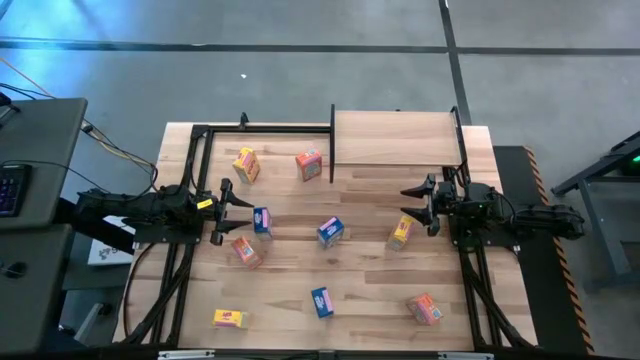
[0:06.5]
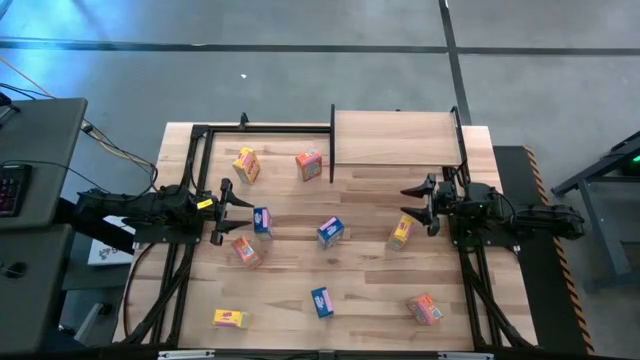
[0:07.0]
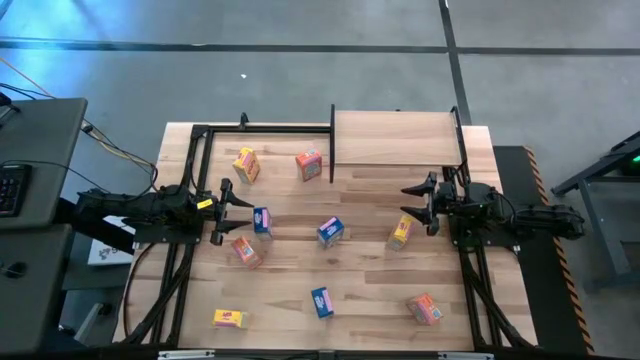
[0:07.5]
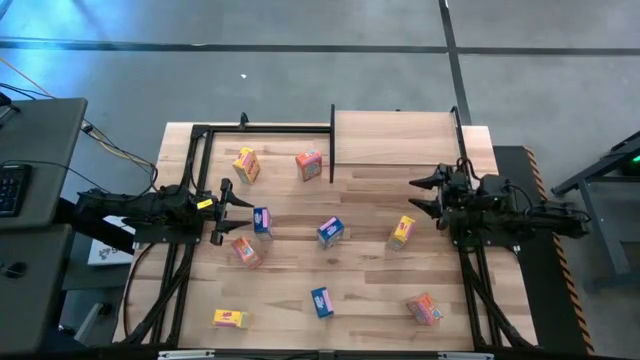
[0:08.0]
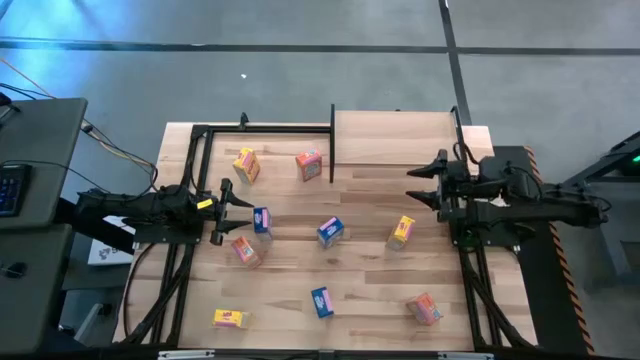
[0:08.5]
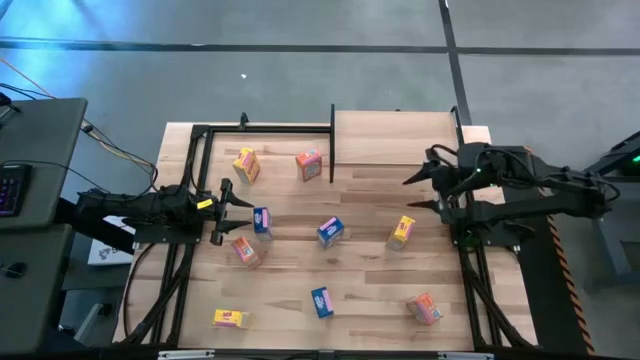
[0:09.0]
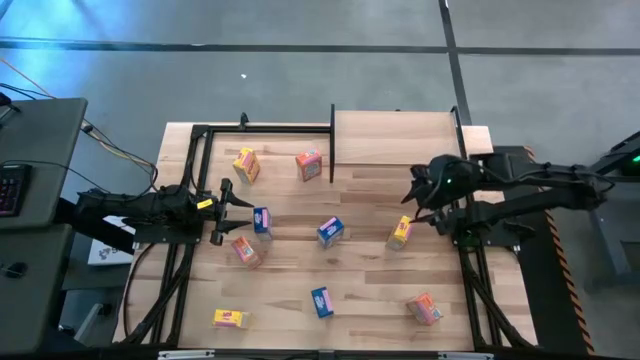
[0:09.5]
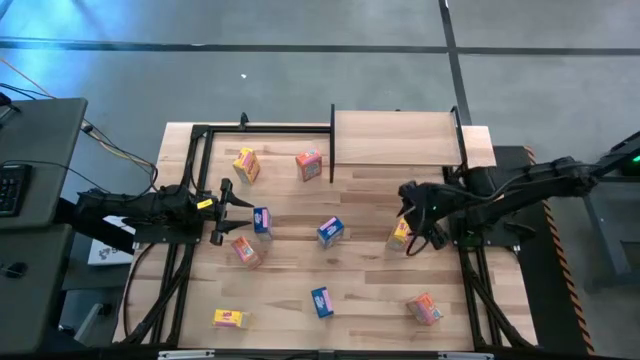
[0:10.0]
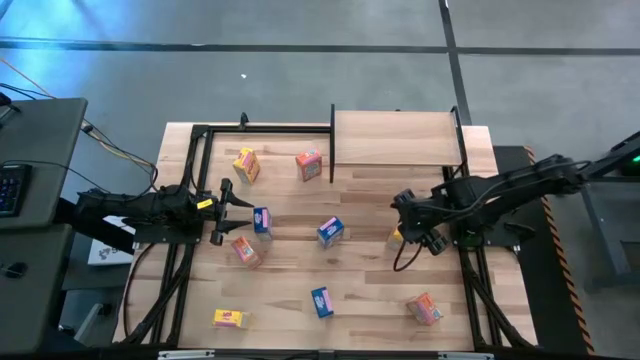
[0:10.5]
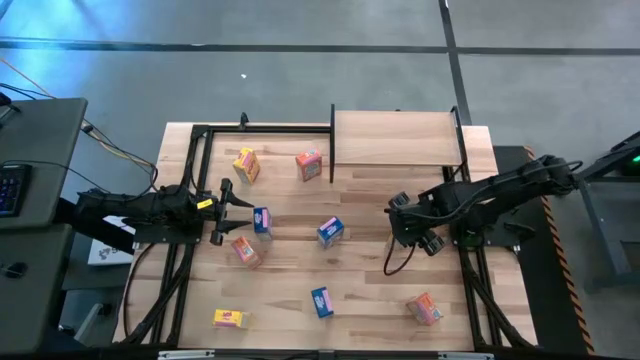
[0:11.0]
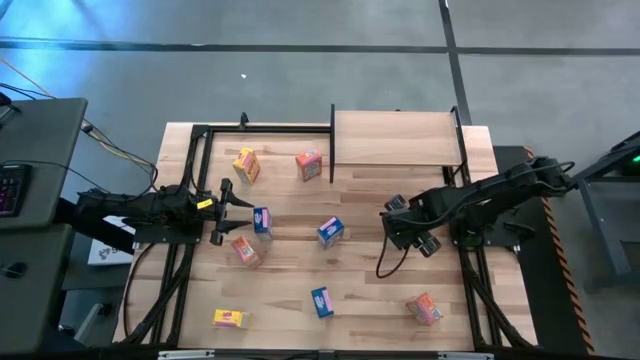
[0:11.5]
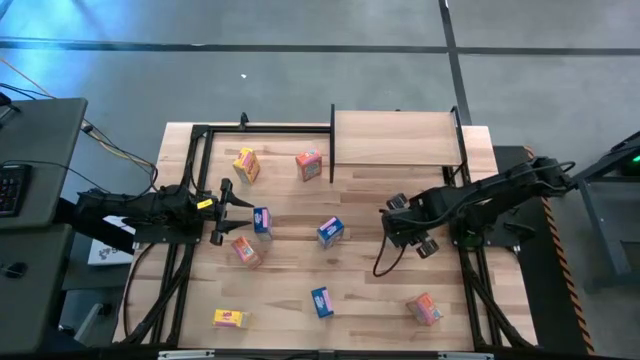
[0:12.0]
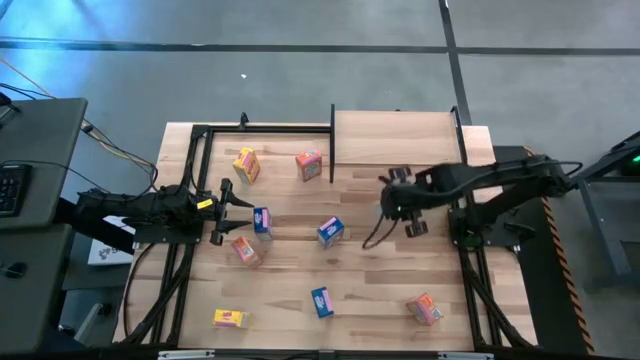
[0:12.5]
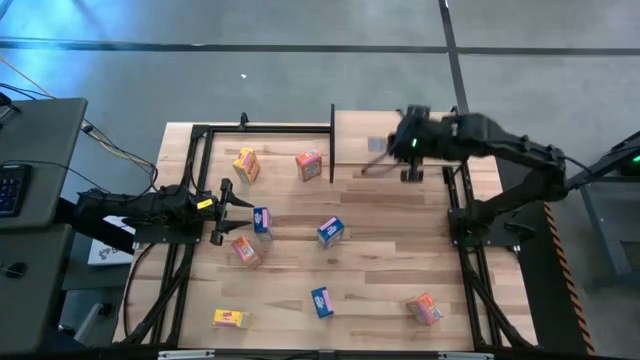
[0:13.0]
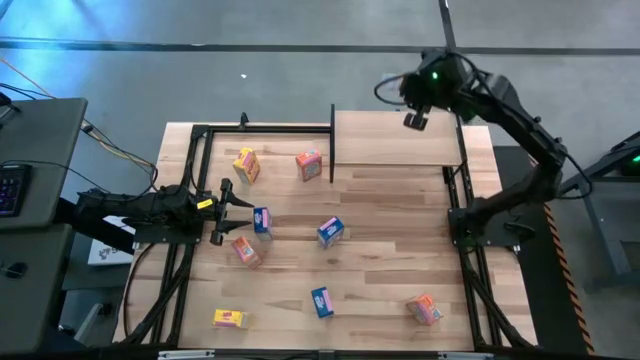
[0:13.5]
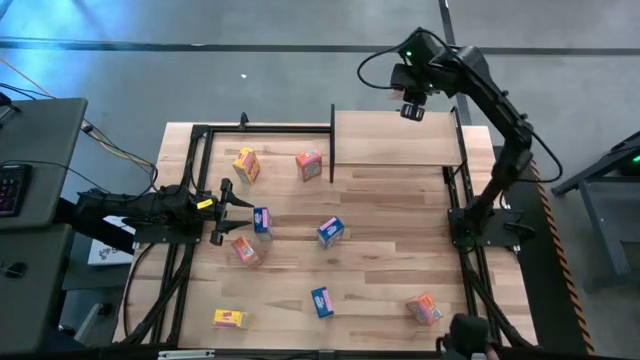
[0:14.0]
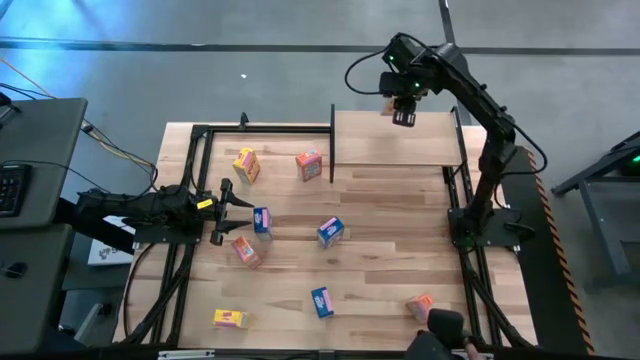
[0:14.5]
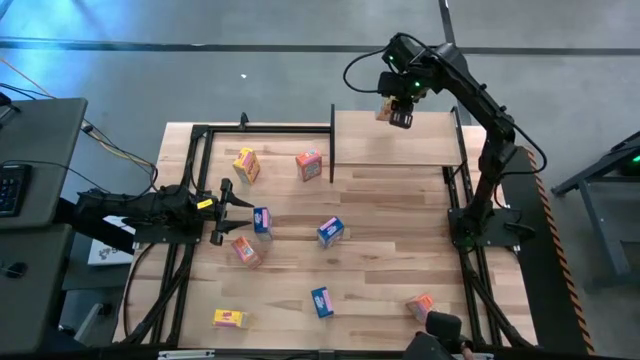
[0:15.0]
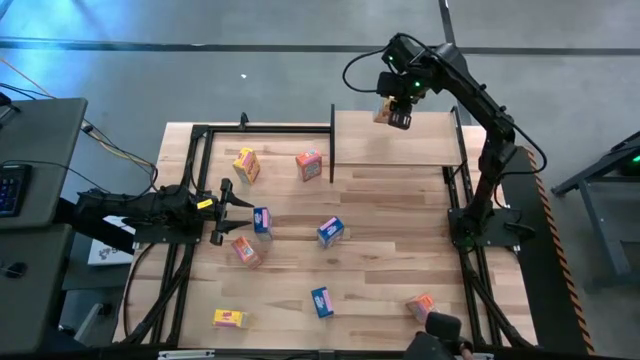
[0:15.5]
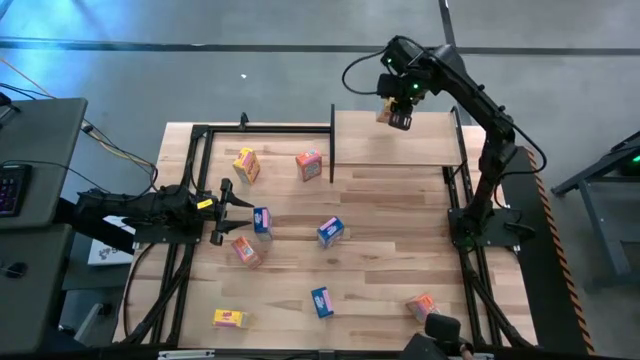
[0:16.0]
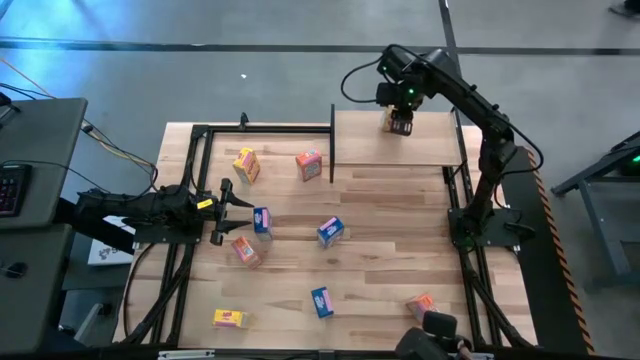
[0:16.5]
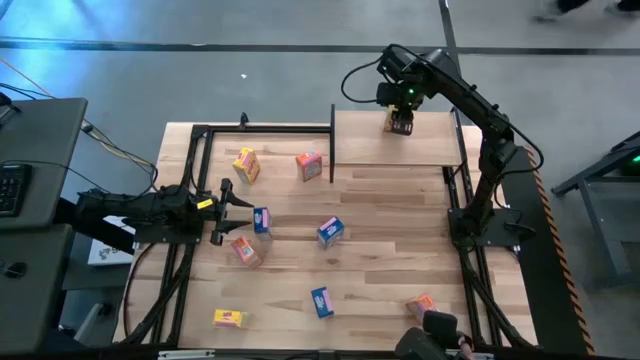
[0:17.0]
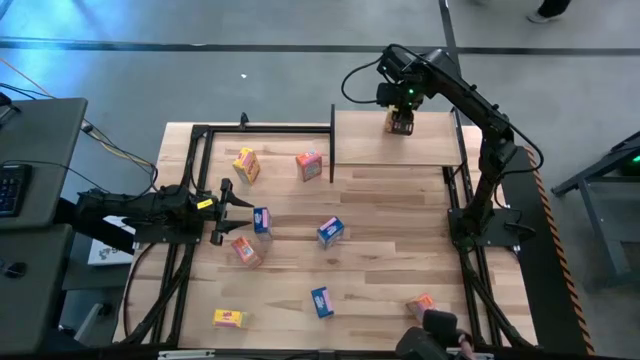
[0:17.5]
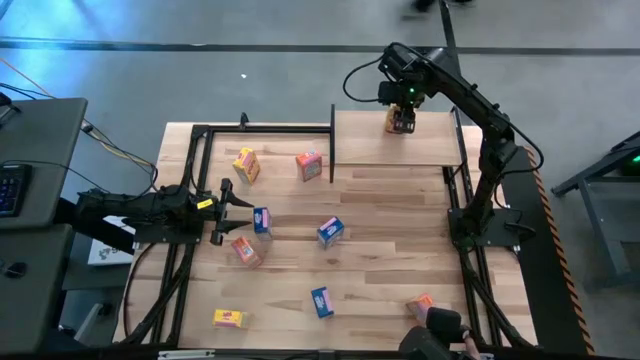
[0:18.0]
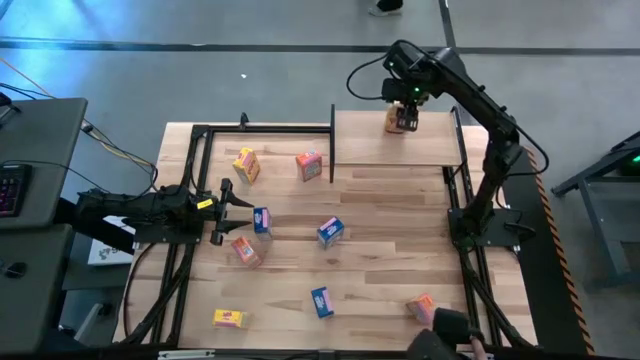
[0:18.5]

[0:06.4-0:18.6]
Task: Stack cereal on shelf
Put the right yellow cereal box on the shelf
